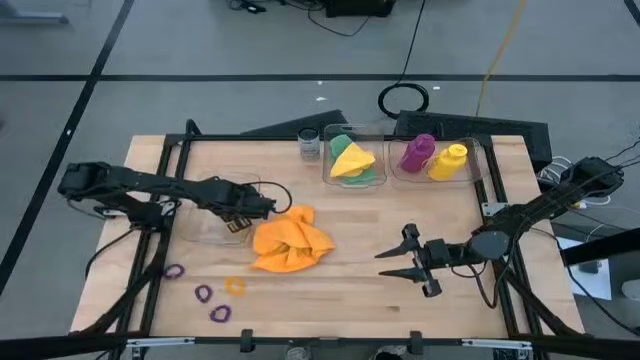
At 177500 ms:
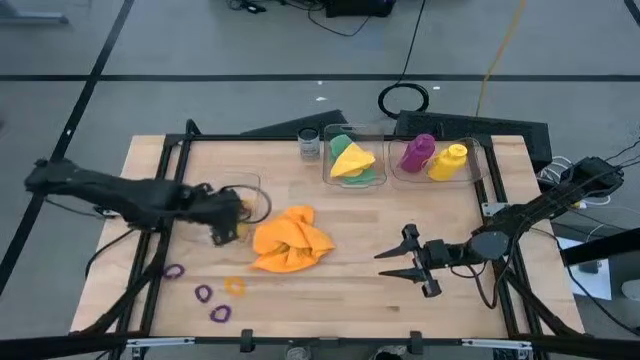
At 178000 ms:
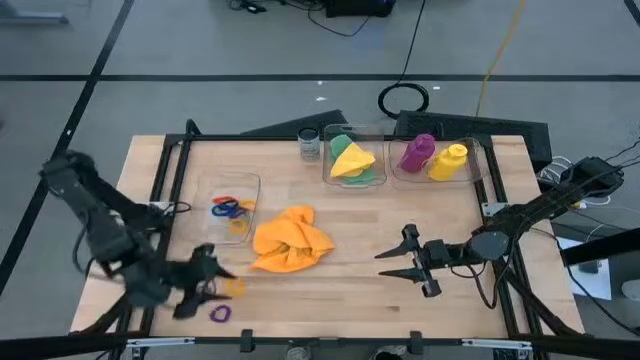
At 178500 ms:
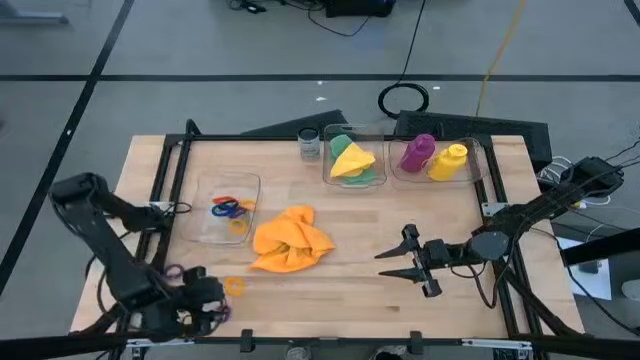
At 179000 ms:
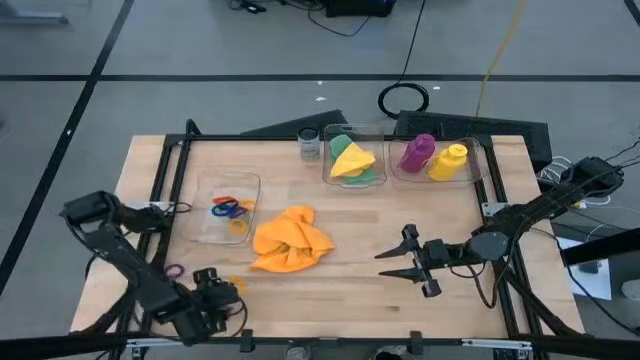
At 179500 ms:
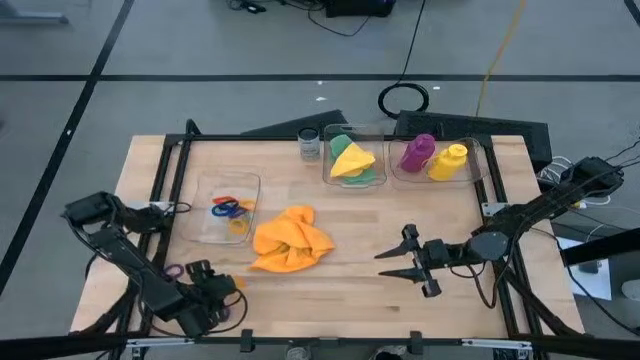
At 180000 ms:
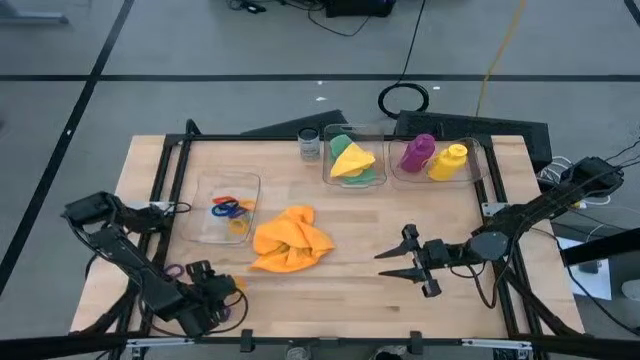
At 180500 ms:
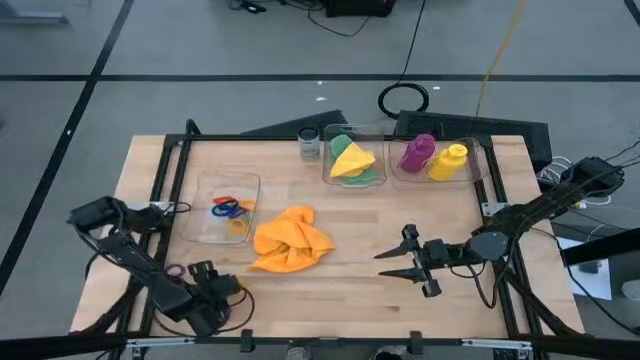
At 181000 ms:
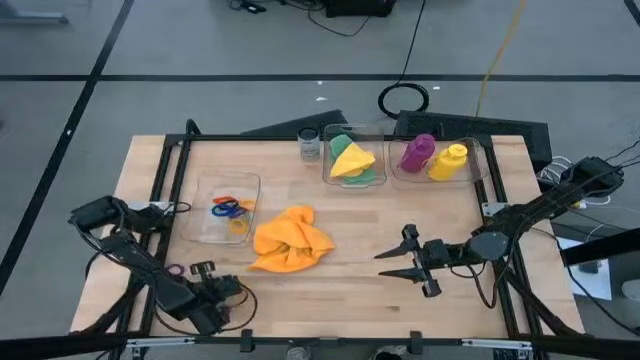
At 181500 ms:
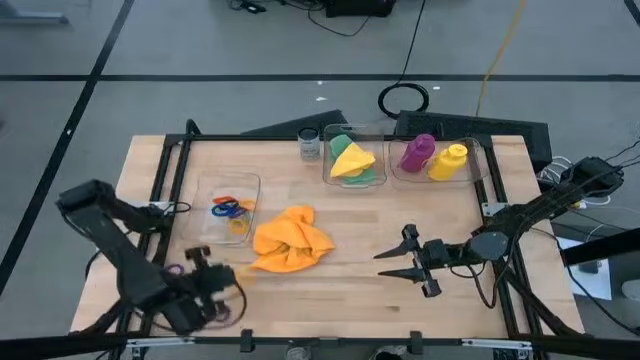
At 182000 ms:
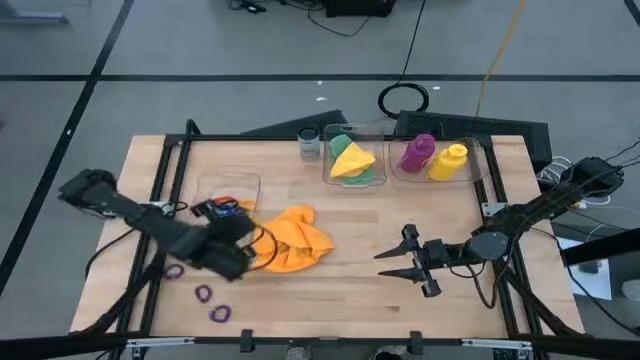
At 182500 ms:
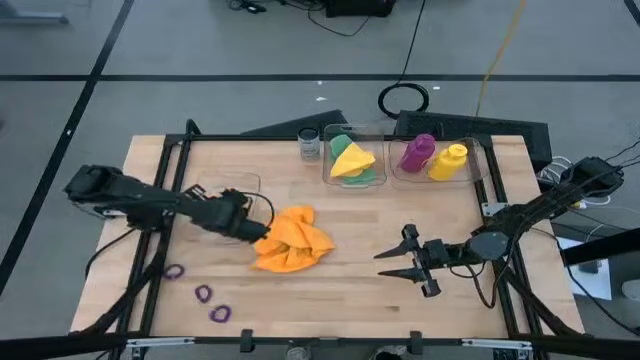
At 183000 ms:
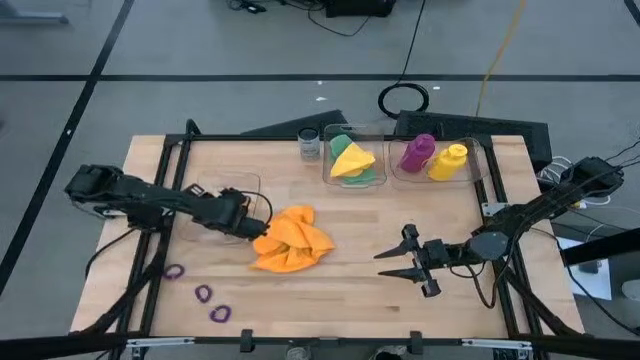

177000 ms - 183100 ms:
Task: Pick & Place Sports Items
Put the yellow spring keychain into the bottom transparent bin

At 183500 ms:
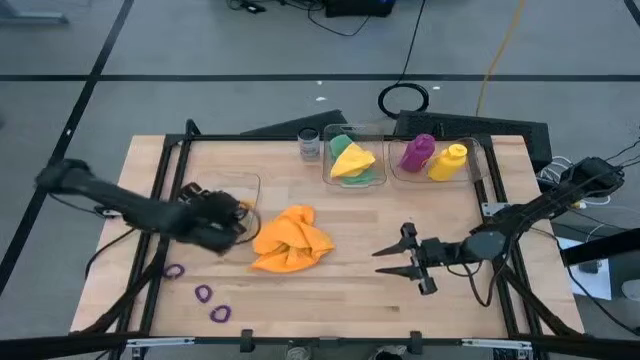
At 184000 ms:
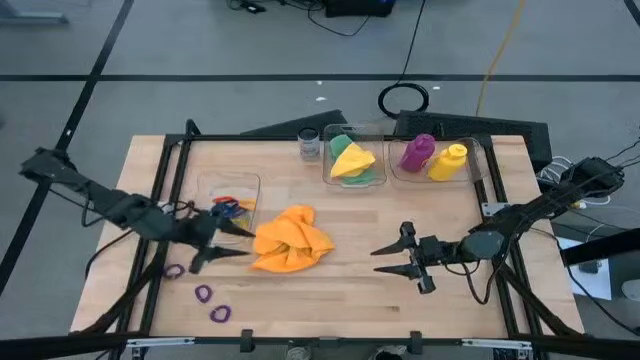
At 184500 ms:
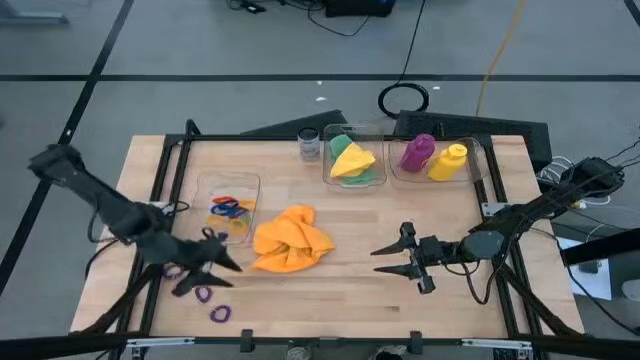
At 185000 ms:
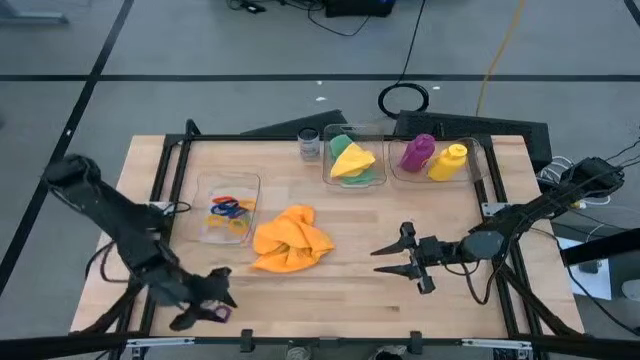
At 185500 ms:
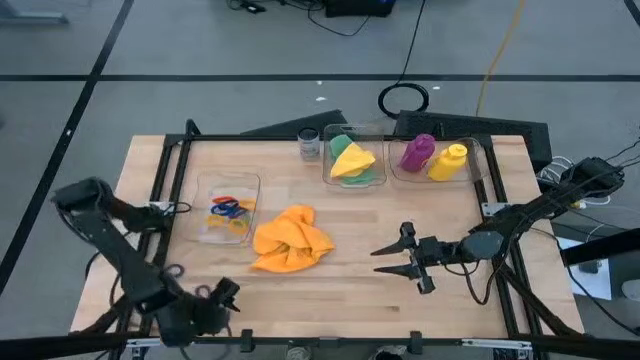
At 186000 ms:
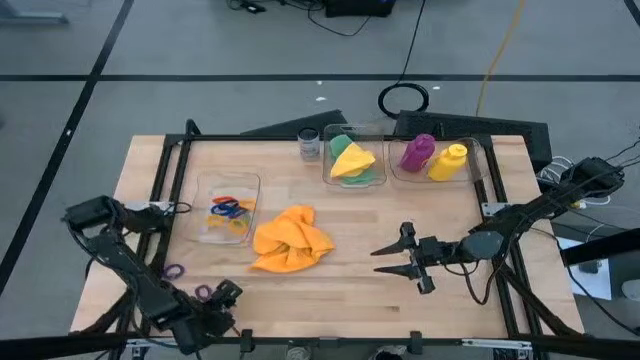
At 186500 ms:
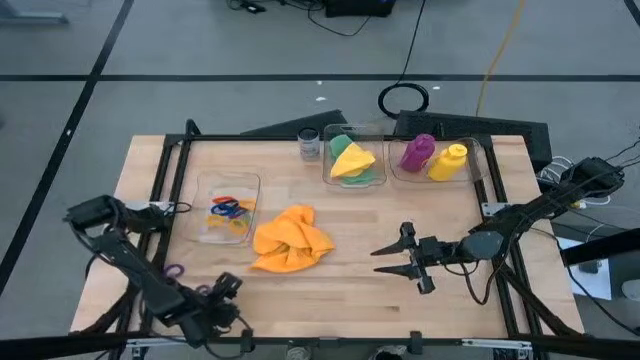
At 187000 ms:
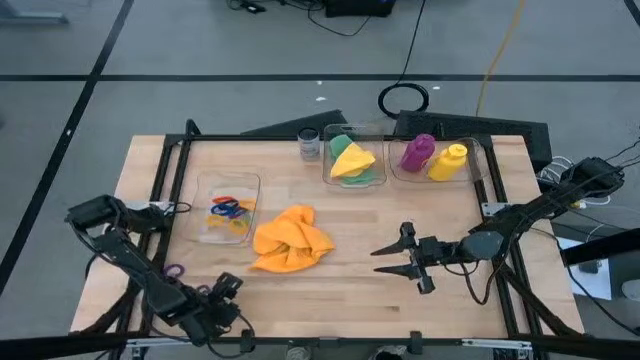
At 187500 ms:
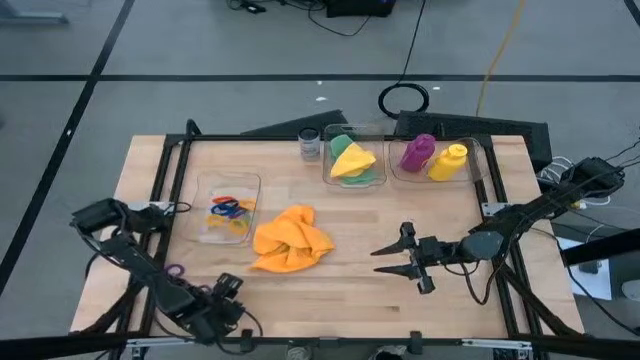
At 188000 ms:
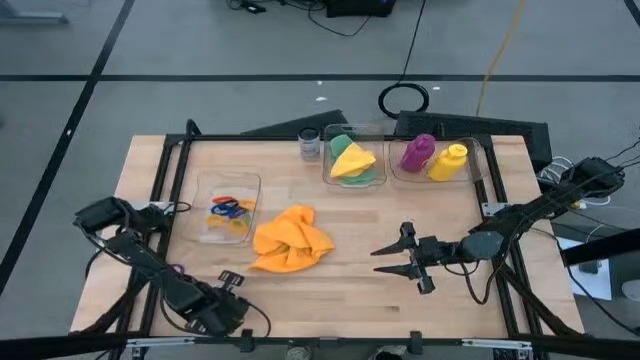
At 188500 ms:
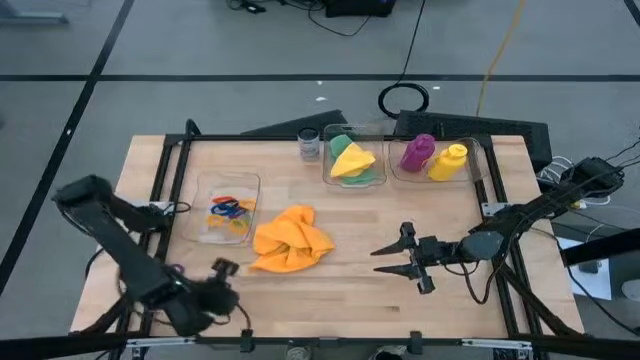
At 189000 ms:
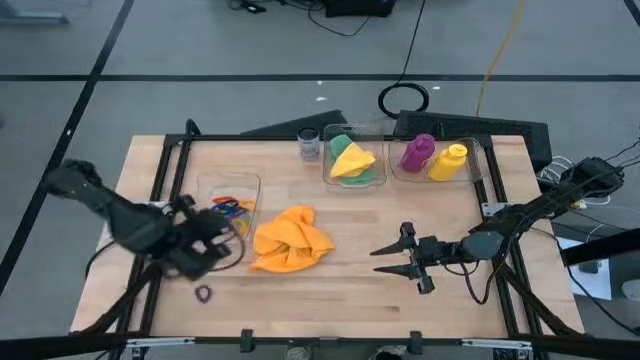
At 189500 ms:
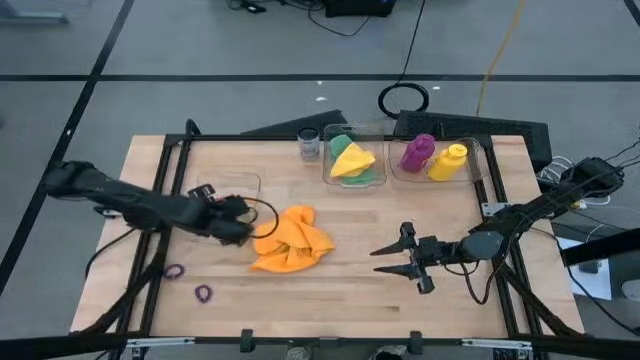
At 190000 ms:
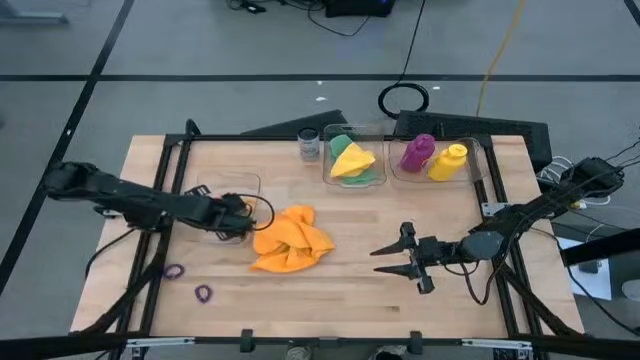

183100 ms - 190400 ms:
Put the bottom purple spring keychain into the bottom transparent bin

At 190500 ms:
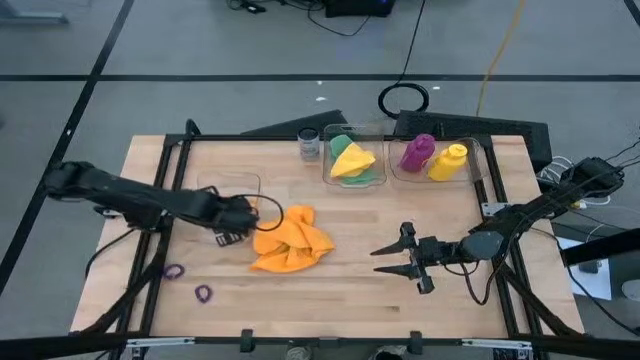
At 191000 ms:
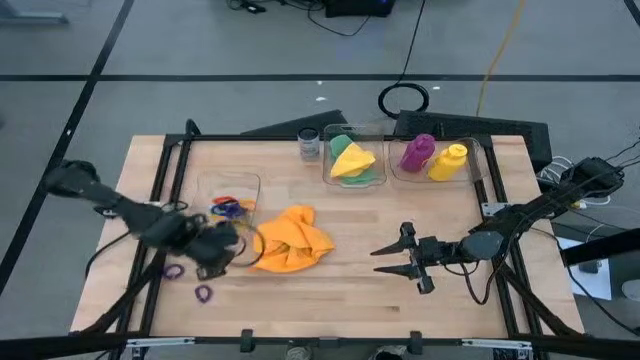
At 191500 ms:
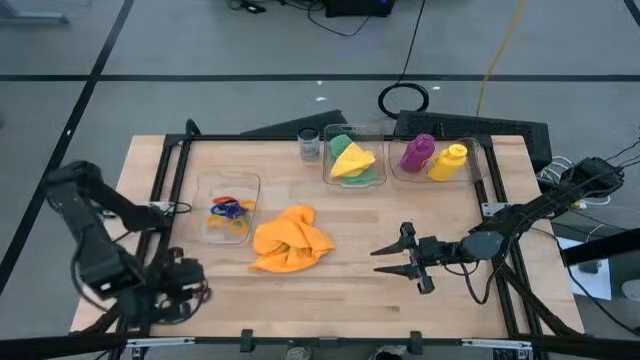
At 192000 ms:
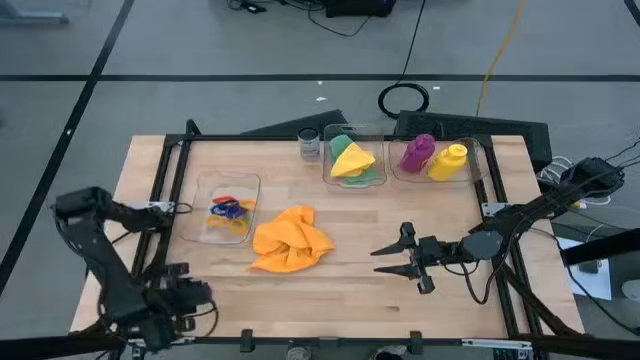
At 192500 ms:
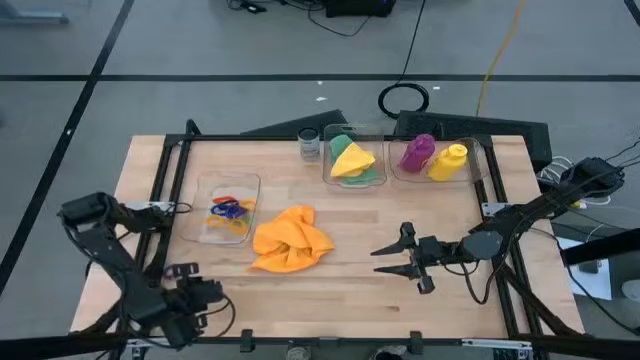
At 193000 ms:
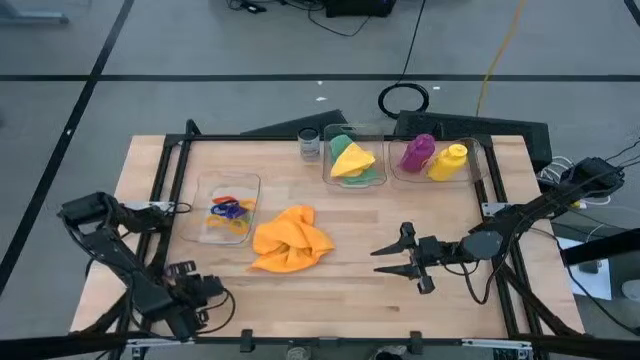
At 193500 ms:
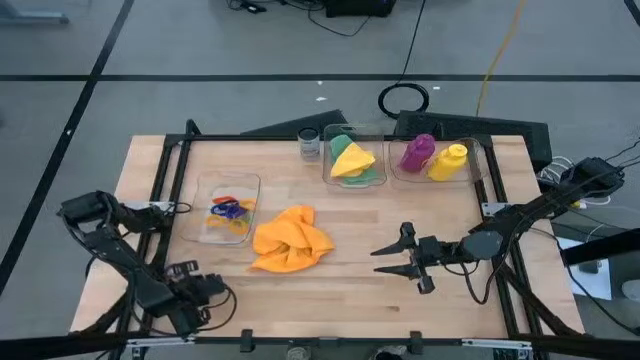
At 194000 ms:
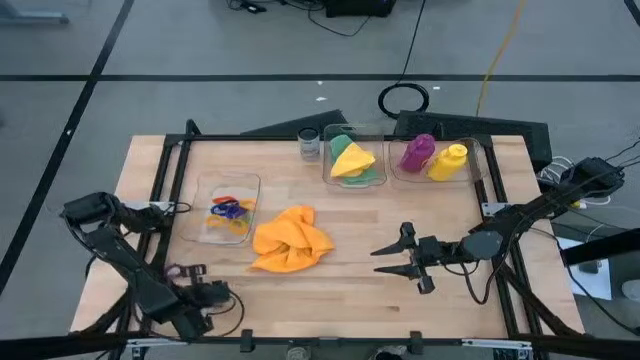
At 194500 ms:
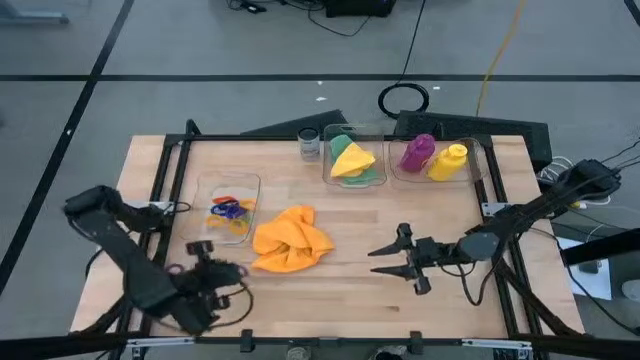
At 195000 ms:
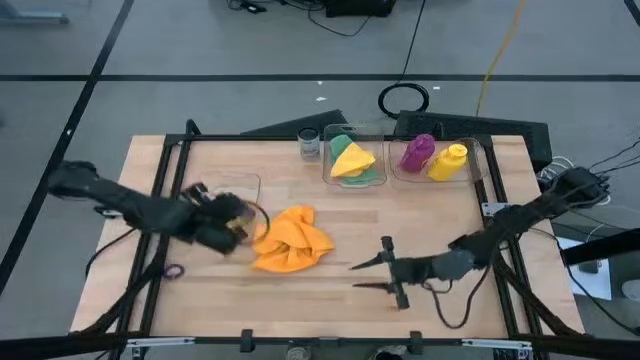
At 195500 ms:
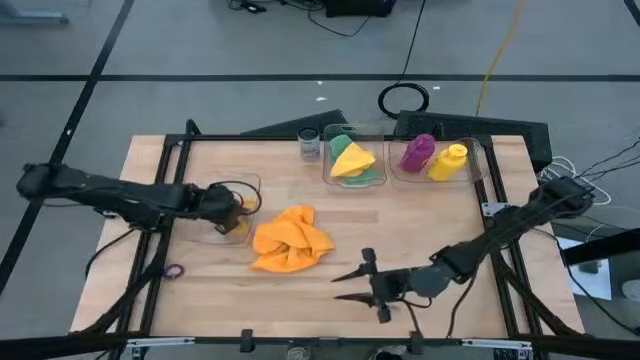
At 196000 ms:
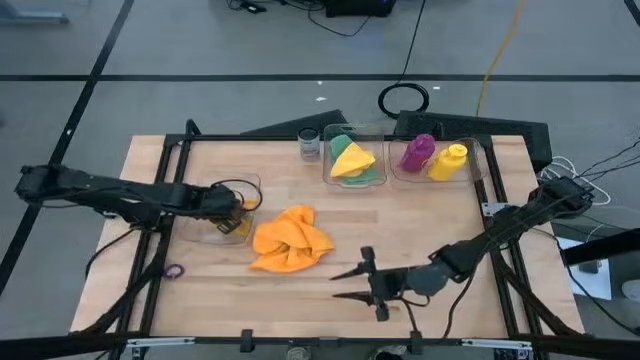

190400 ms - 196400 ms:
Put the bottom purple spring keychain into the bottom transparent bin
